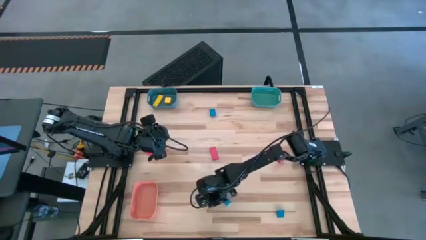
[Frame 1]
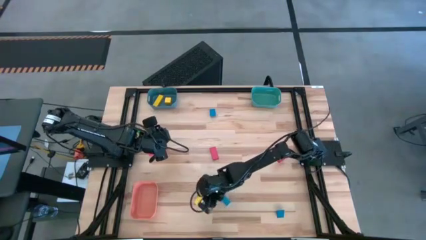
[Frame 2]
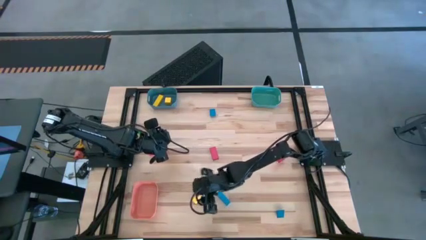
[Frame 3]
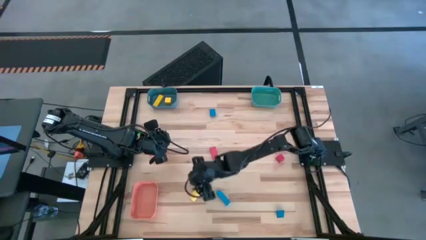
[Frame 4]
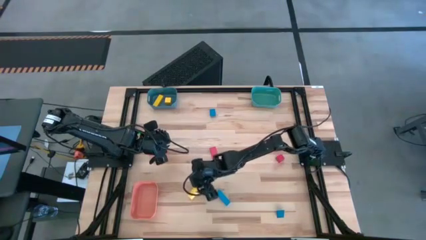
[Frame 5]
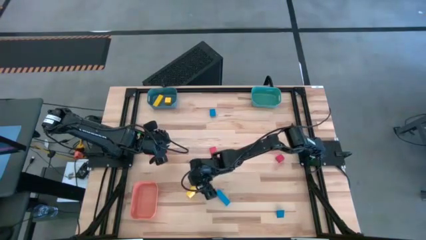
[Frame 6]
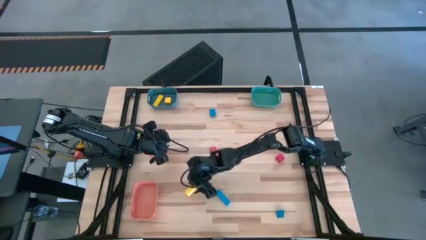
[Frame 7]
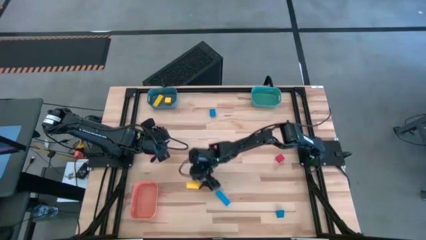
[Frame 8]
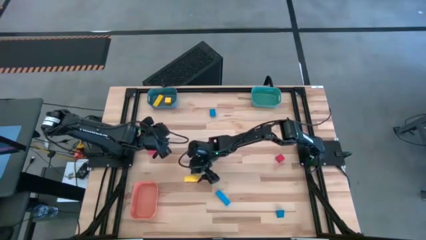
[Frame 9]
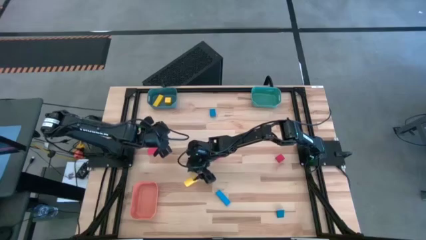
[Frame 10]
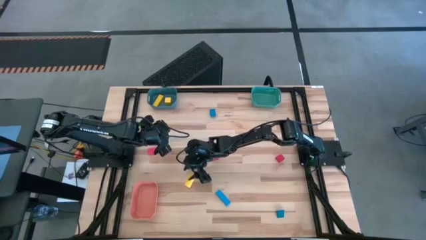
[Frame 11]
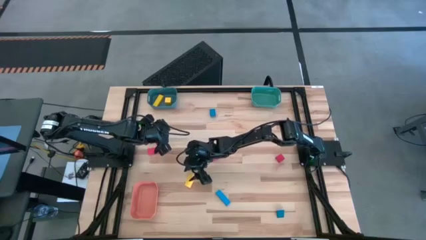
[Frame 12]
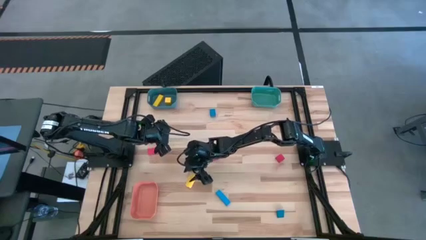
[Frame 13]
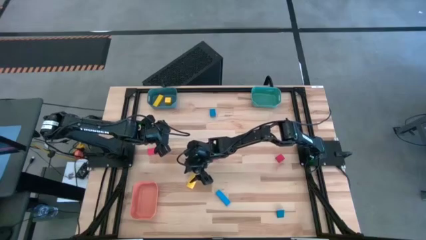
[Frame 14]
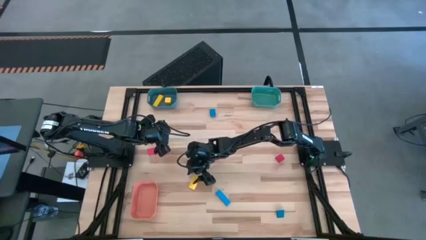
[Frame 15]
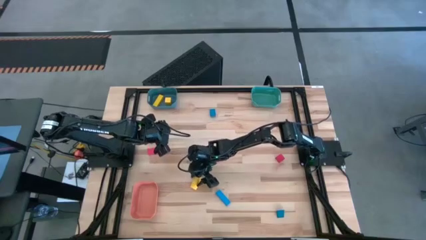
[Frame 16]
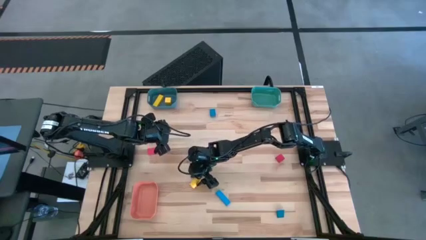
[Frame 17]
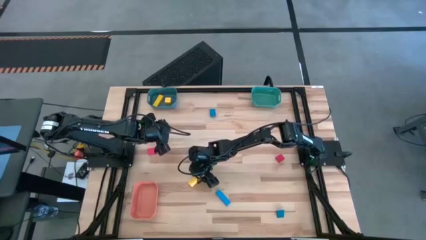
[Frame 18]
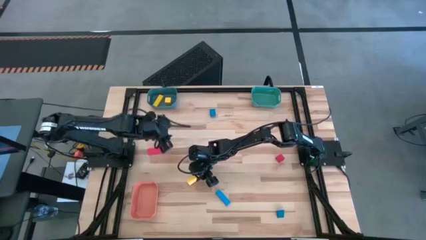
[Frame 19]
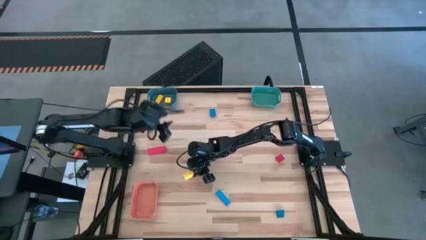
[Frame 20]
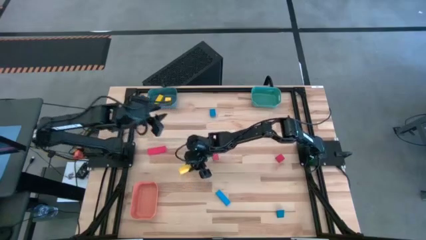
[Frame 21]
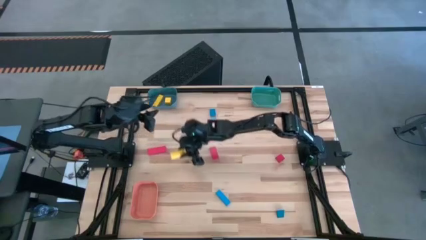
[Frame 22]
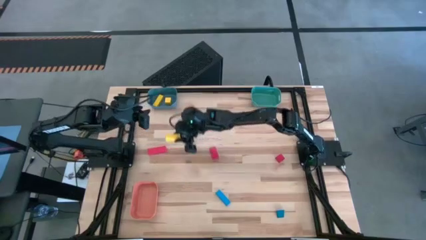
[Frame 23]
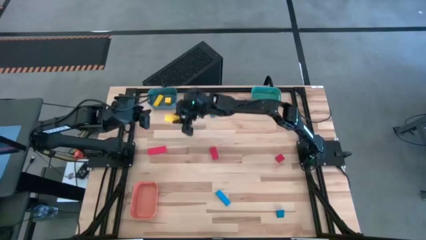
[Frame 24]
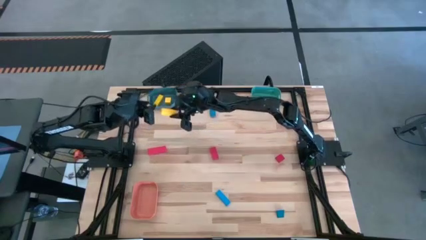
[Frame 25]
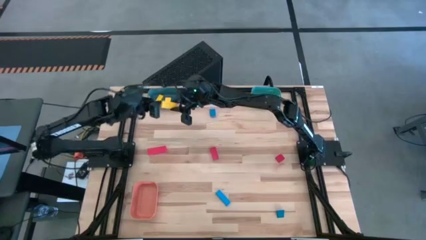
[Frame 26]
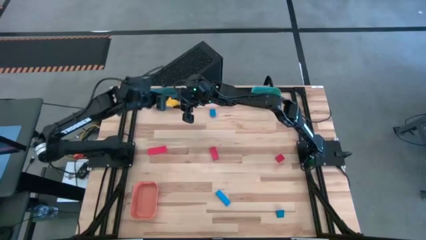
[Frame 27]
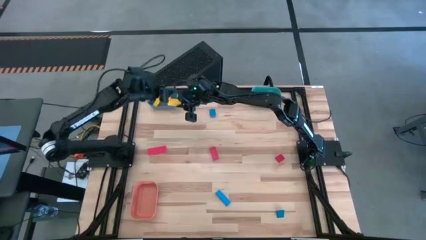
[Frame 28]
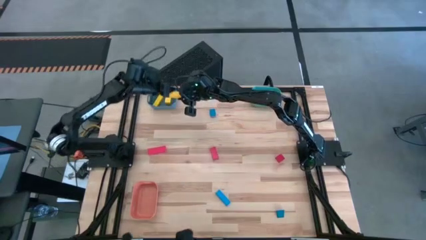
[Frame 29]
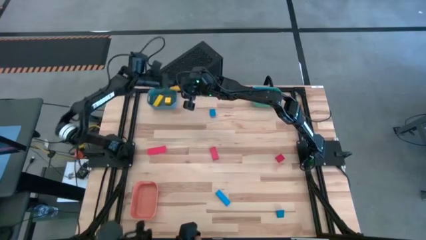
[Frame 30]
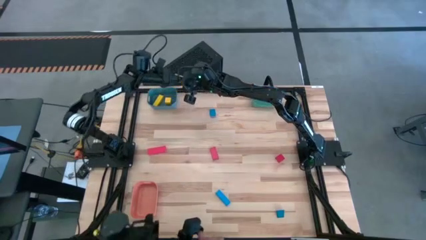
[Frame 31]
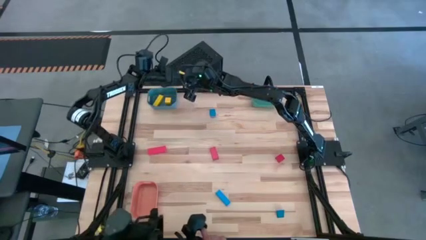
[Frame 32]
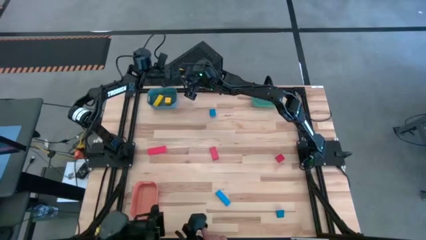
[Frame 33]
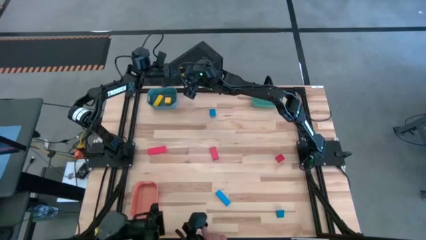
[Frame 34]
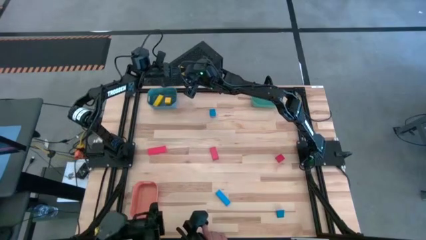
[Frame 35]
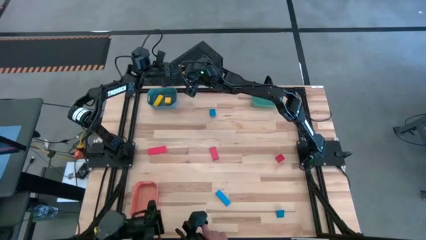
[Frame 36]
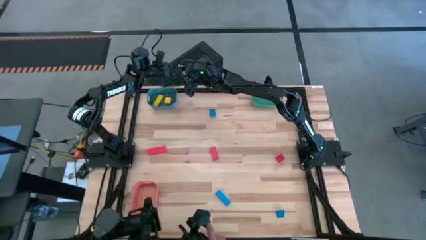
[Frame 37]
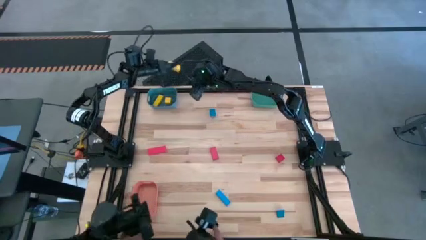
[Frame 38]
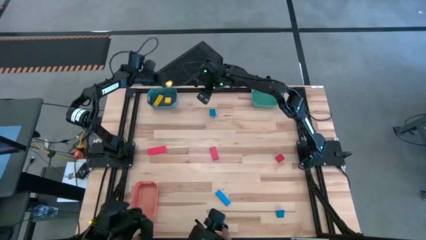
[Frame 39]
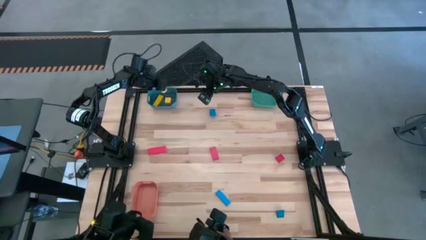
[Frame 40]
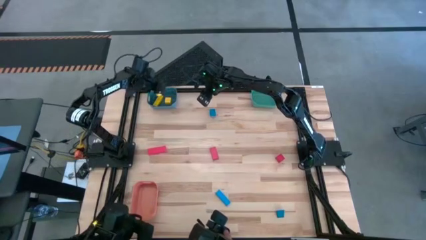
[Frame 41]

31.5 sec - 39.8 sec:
Task: Sort & place blocks by color
Put the yellow block into the blue bin

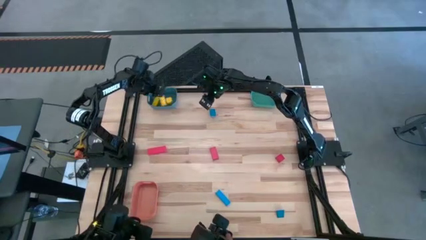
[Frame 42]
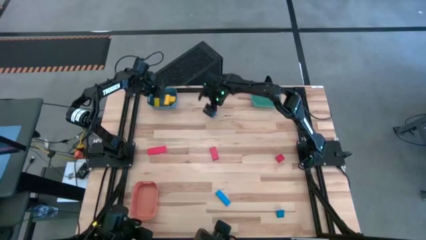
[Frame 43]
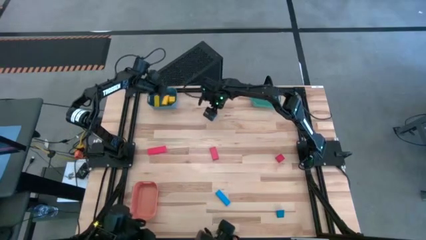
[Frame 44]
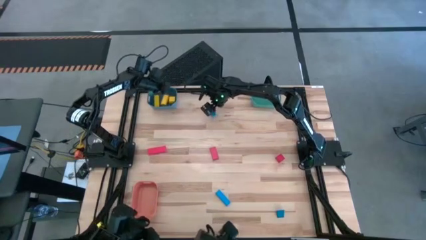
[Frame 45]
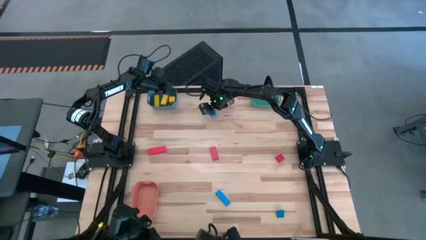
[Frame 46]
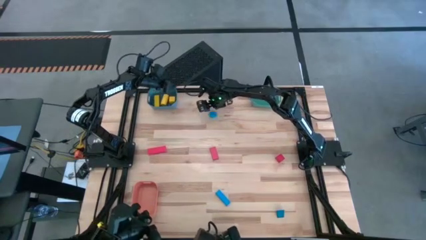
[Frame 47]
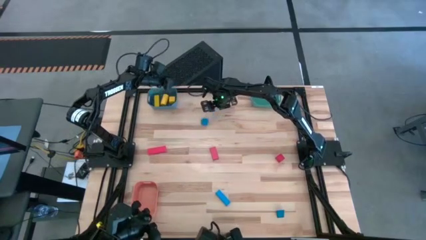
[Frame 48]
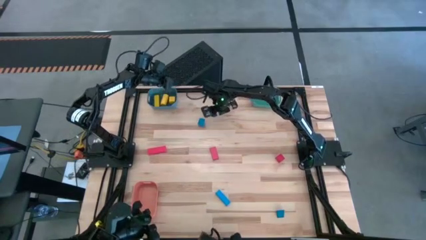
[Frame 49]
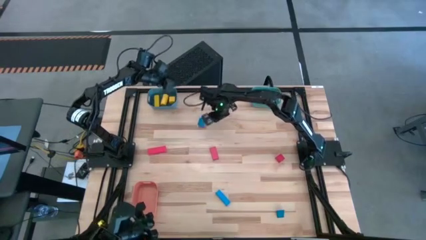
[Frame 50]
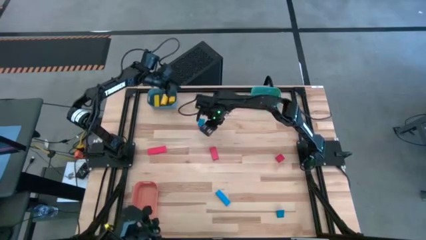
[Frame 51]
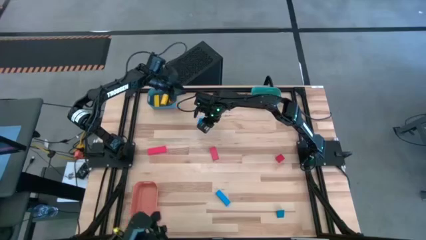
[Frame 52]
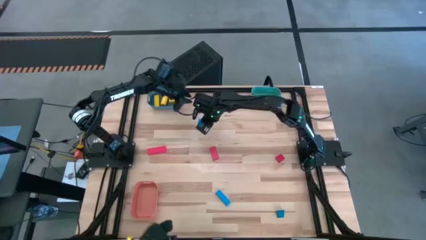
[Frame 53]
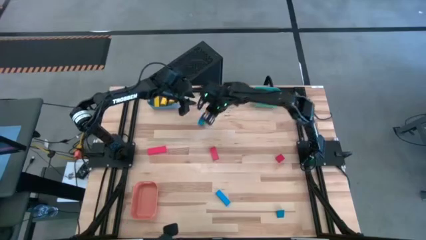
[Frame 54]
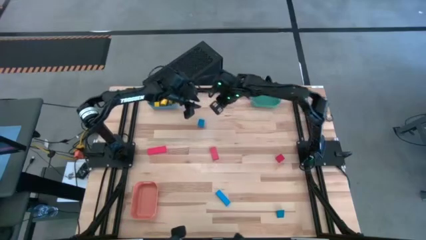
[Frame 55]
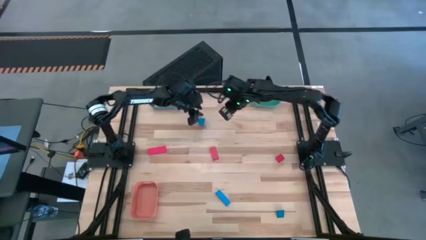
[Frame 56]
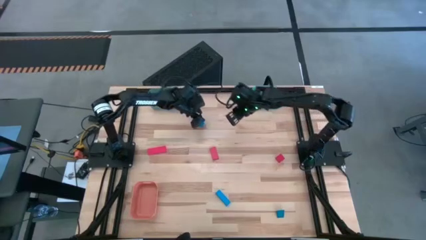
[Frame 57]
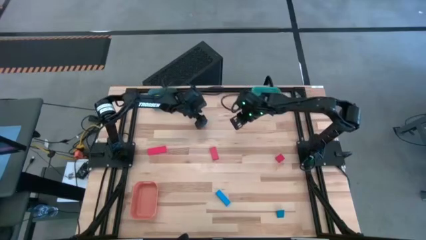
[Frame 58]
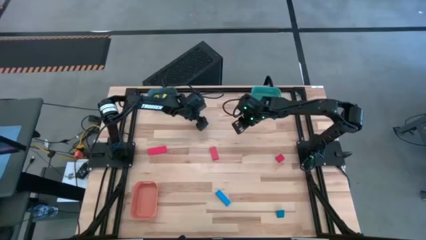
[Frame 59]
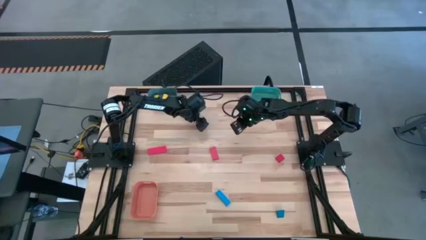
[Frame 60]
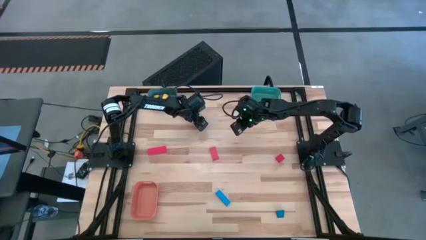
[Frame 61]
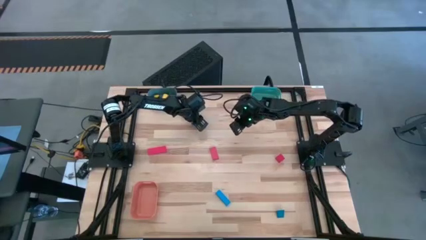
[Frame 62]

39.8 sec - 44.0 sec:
Put the top blue block into the green bin

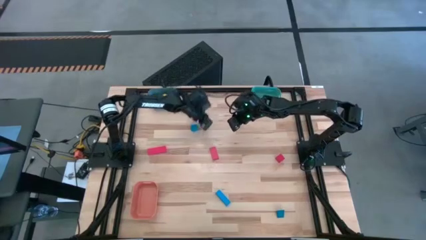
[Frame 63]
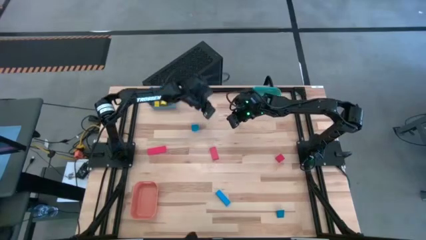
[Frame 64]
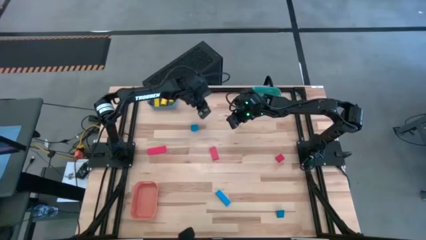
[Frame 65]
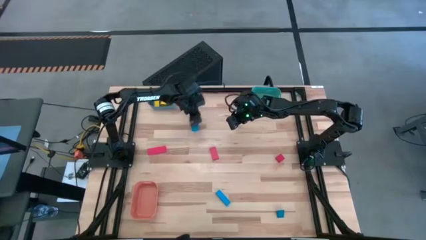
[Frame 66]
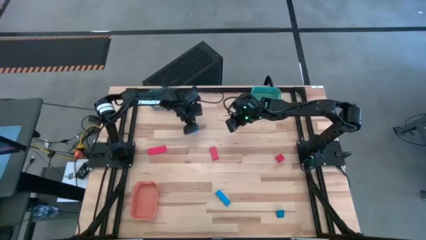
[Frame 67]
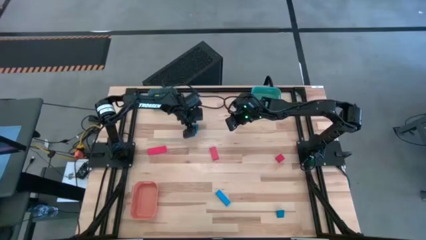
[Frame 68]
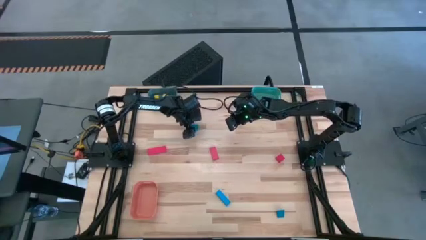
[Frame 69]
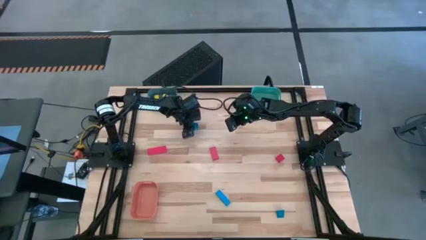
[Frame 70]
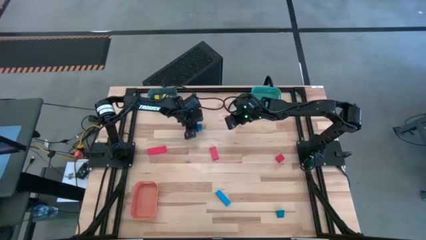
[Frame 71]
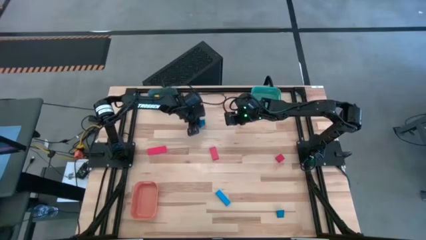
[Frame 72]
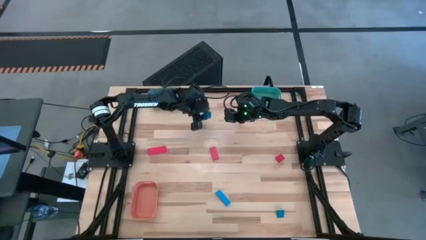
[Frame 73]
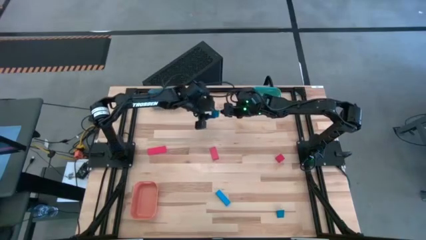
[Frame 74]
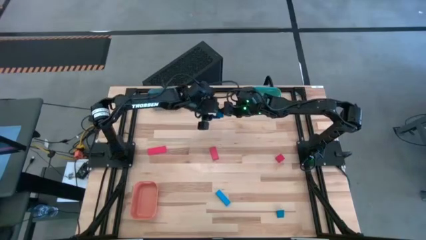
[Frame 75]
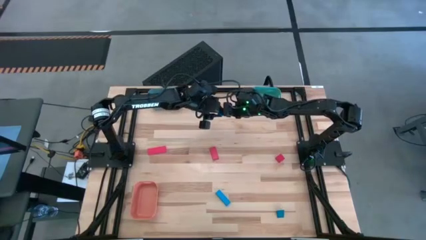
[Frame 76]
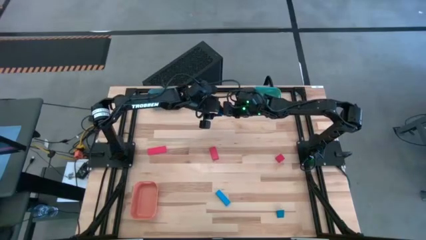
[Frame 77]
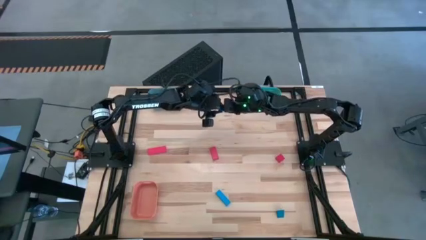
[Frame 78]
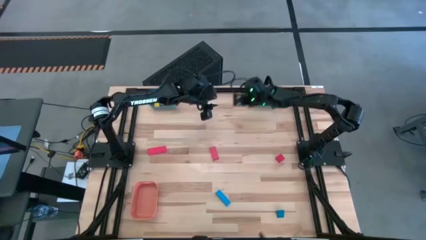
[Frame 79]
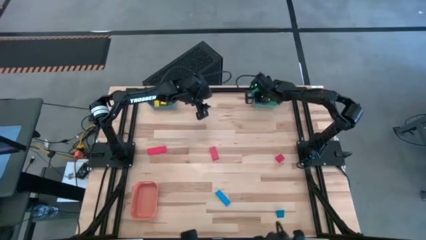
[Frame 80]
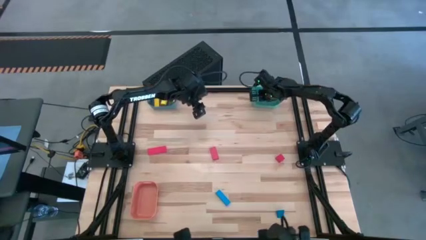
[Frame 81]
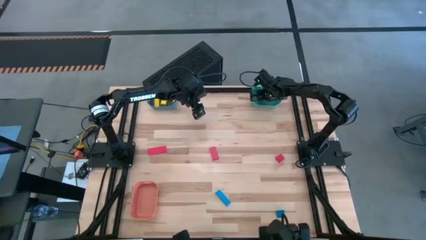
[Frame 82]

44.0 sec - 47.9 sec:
Put the top blue block into the green bin
